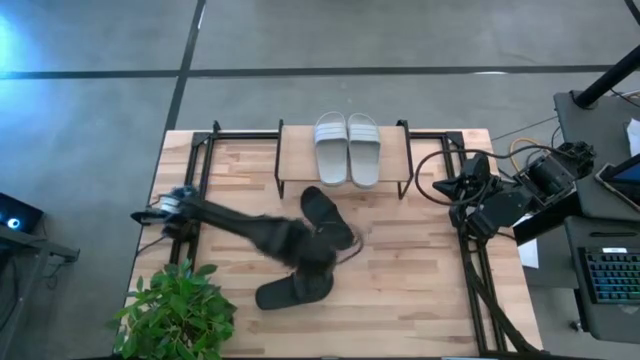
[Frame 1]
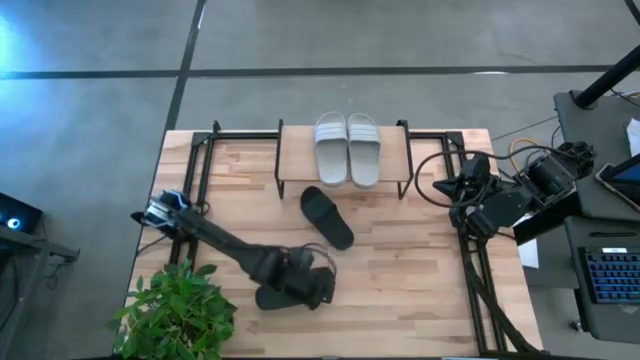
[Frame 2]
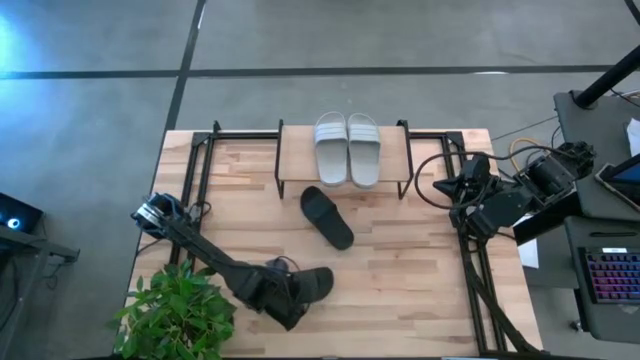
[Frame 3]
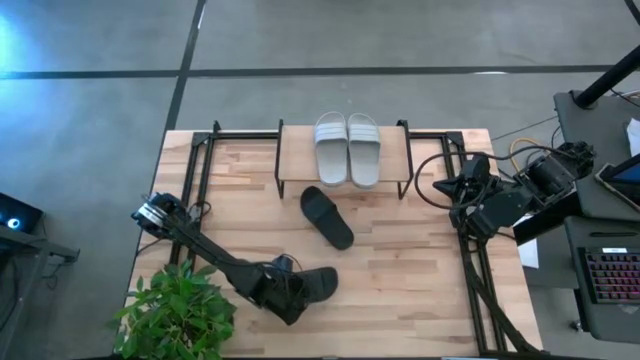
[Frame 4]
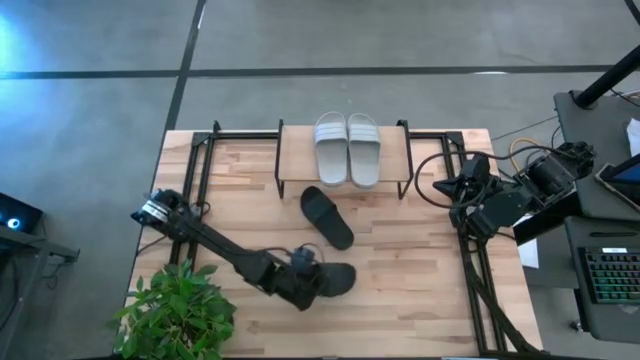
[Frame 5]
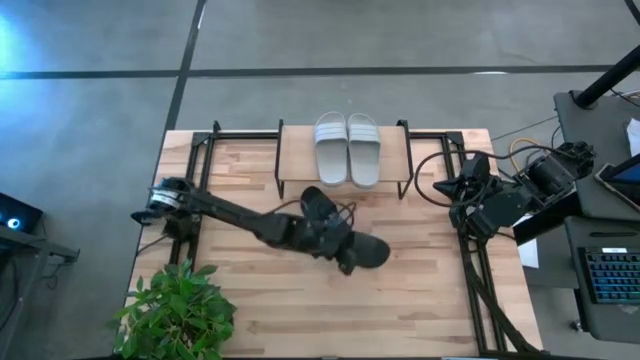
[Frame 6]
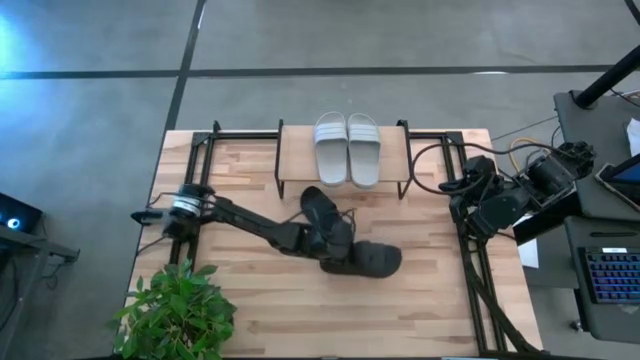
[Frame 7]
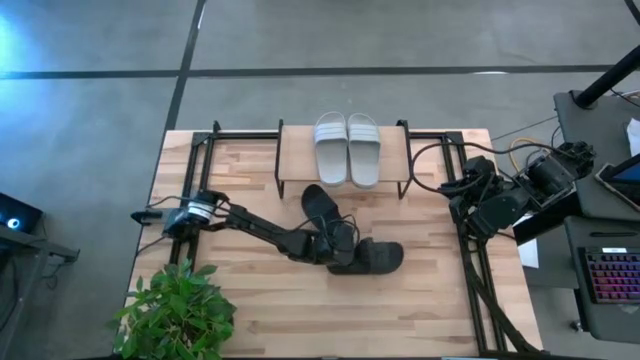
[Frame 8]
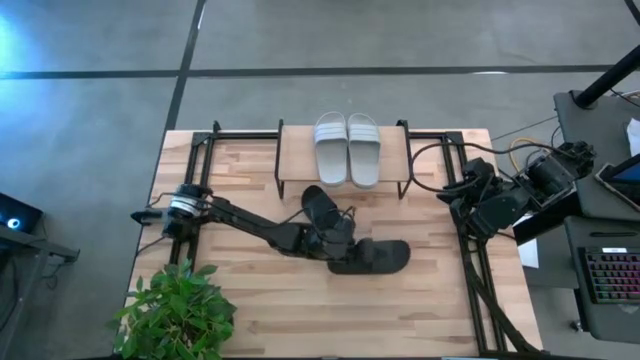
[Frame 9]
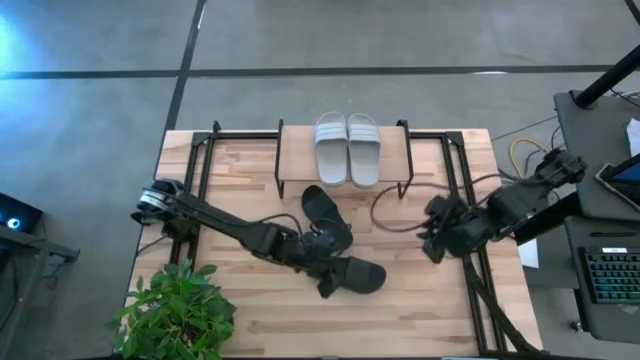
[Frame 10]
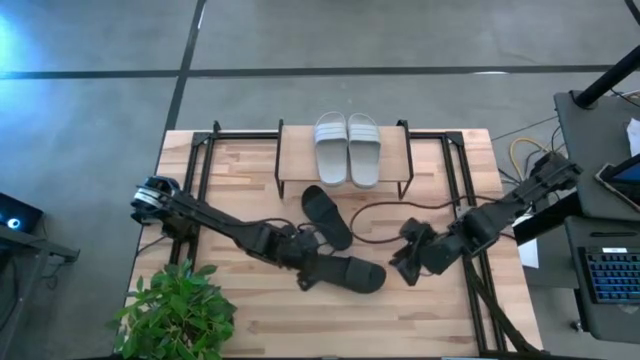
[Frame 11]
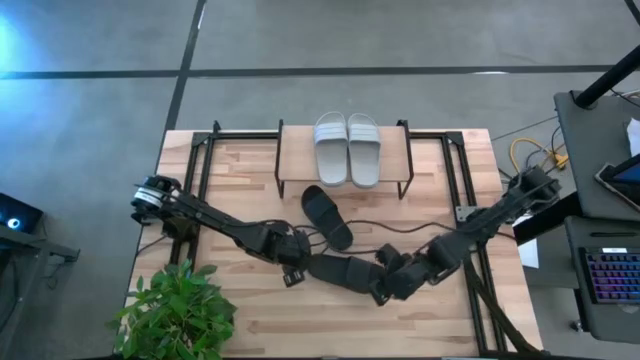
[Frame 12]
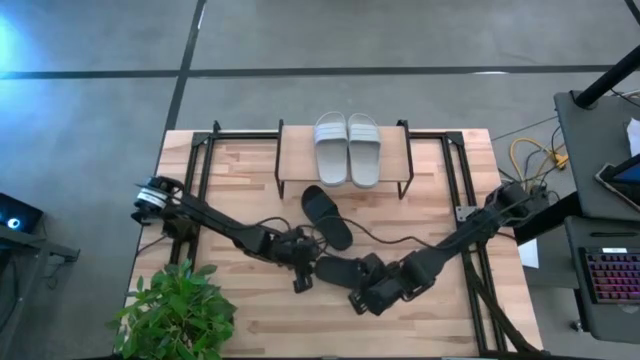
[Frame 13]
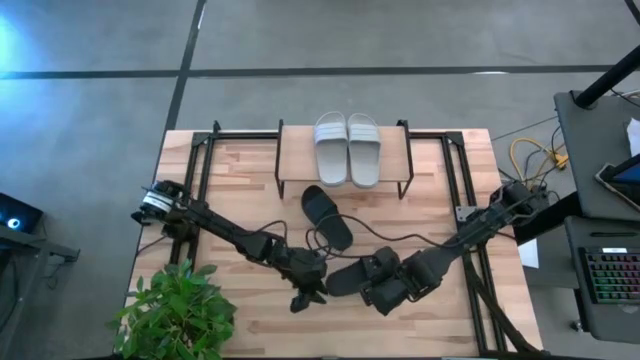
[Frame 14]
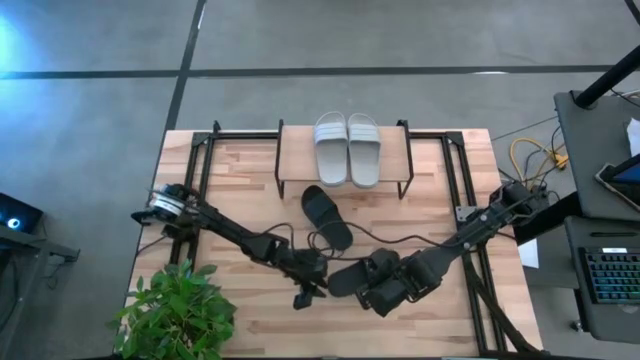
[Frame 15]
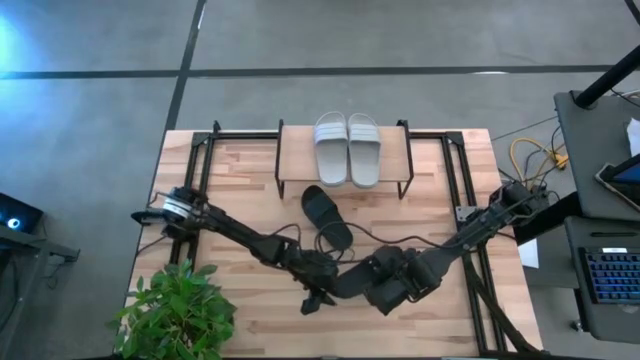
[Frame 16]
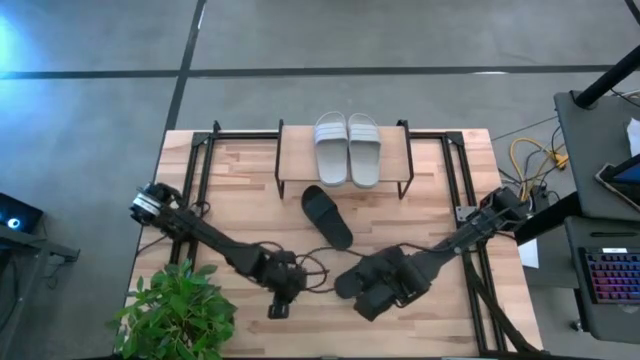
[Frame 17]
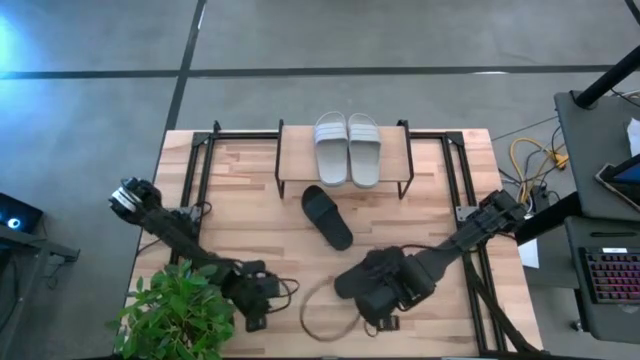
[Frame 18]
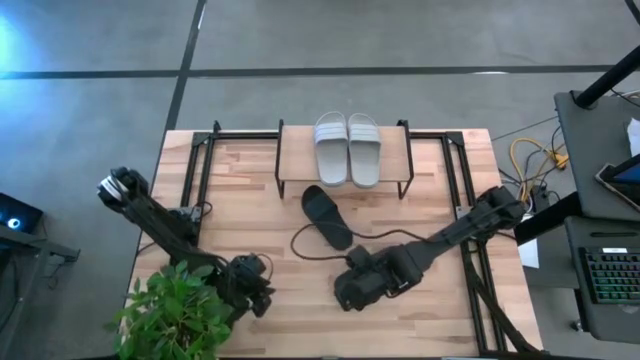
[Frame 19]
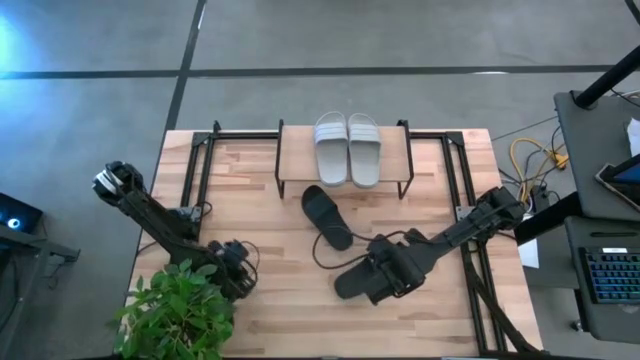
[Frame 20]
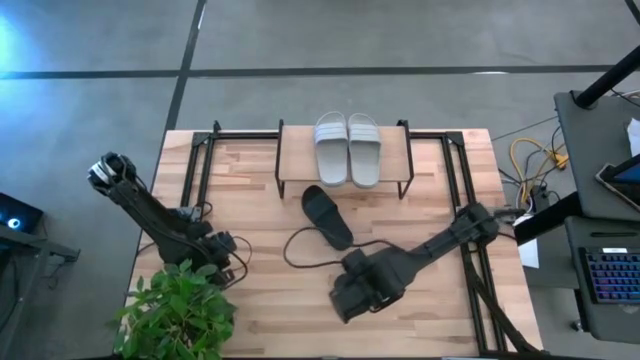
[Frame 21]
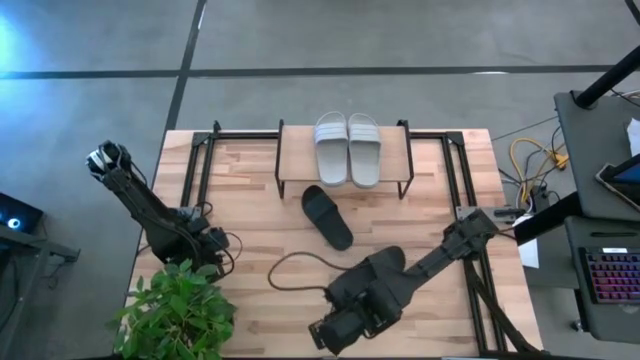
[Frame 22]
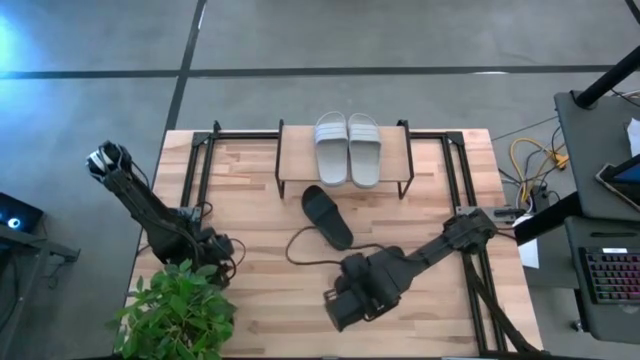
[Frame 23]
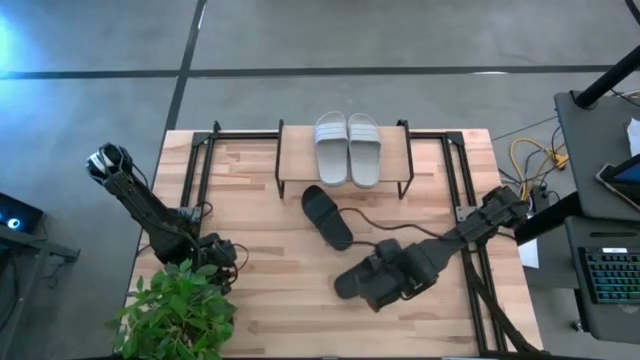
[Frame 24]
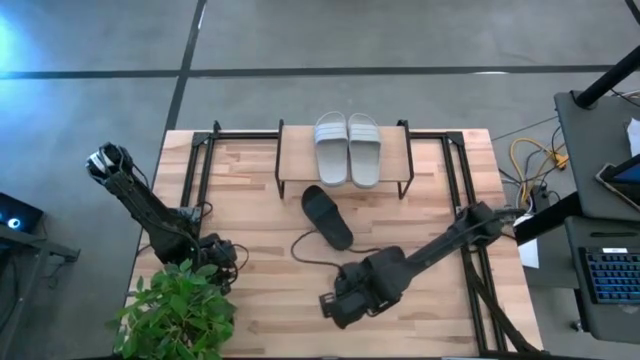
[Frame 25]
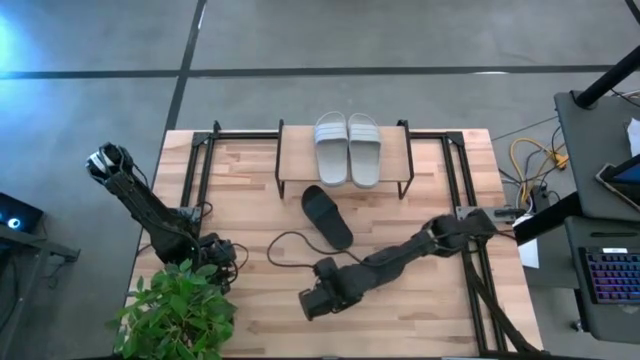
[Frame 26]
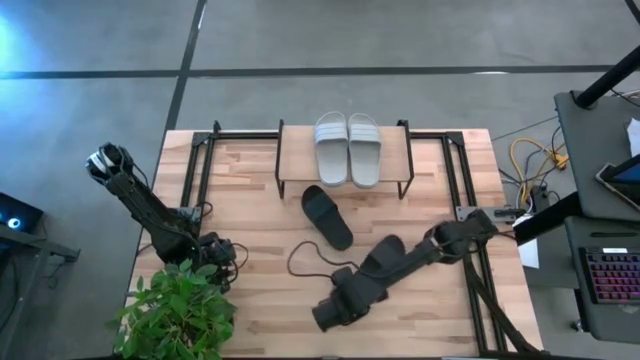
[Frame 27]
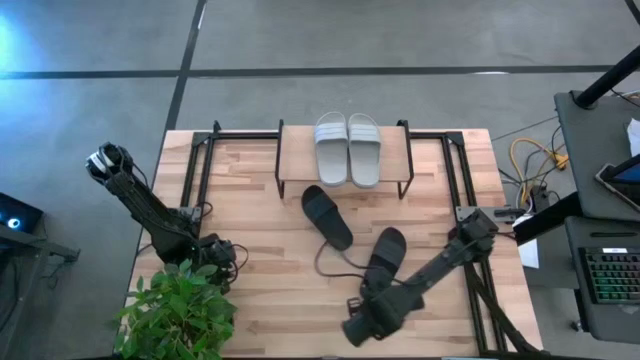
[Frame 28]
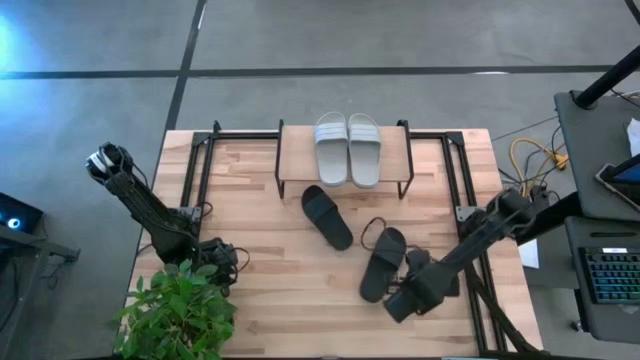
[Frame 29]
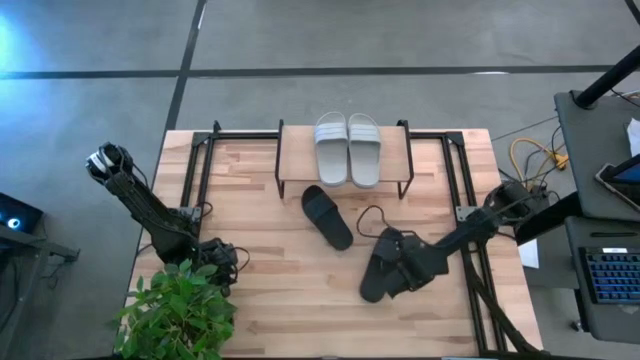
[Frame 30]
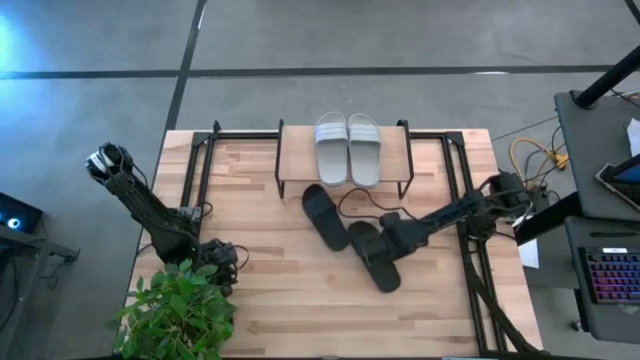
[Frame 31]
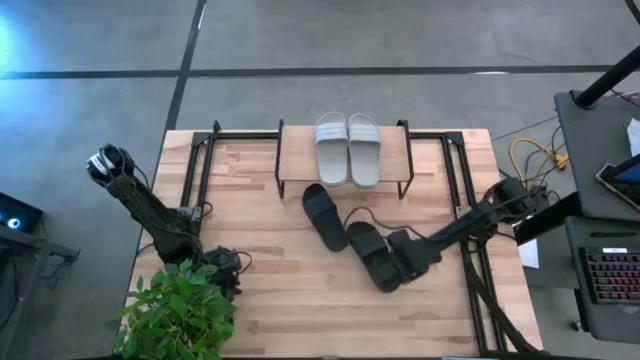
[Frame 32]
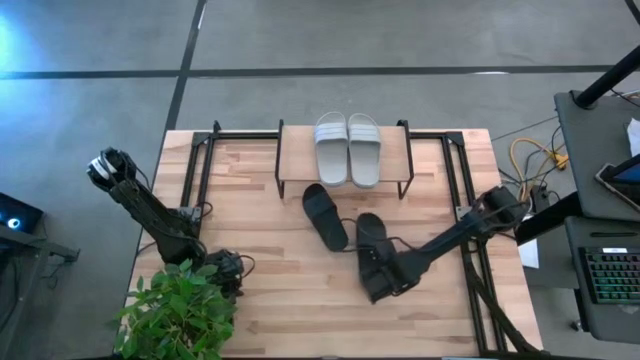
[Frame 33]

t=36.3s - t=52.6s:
Task: Pick and place slides into the shelf
Put the bottom black slide under the shelf

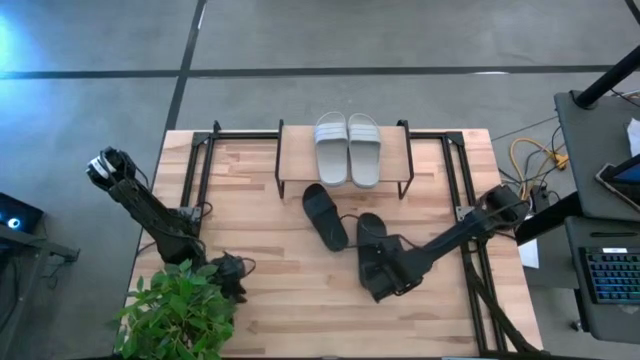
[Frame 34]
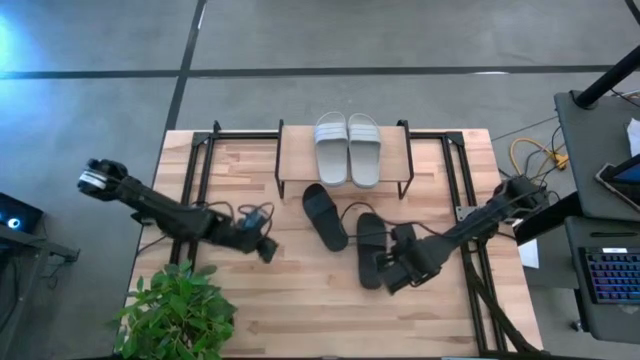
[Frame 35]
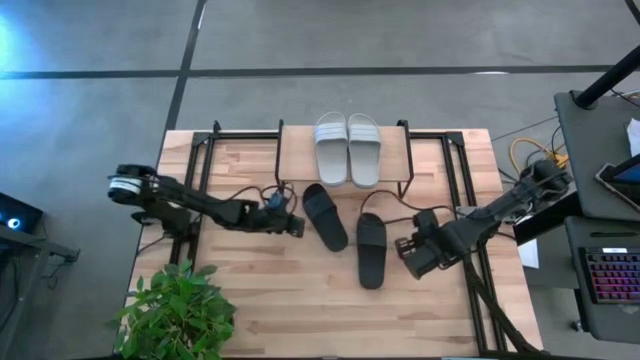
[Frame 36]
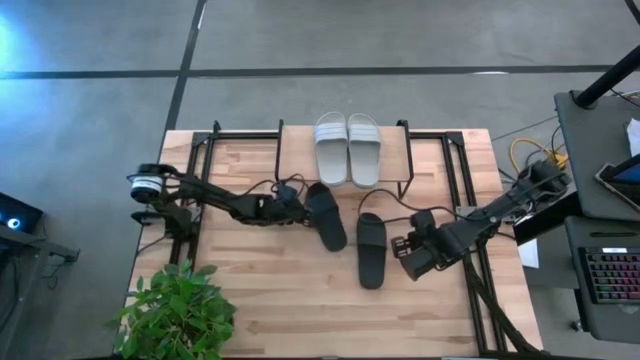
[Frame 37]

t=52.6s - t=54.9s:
Adjust the left black slide

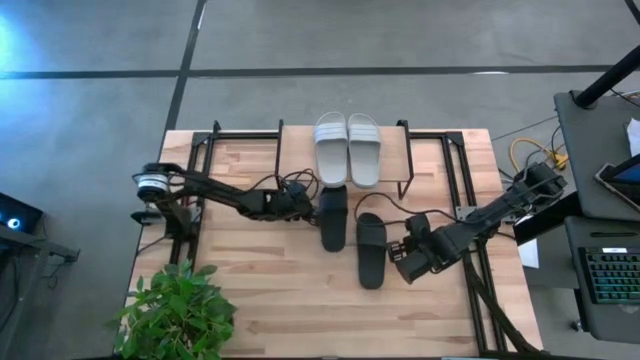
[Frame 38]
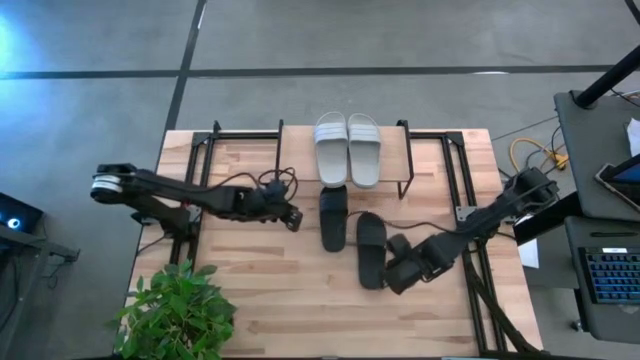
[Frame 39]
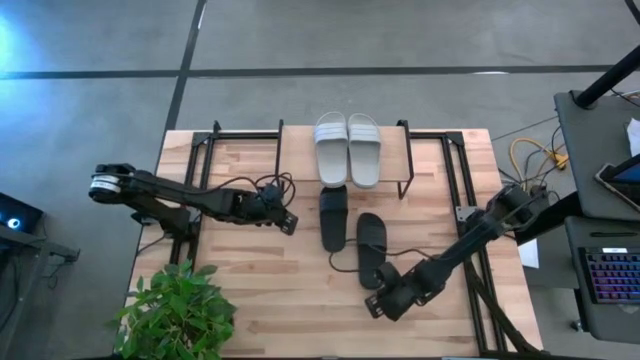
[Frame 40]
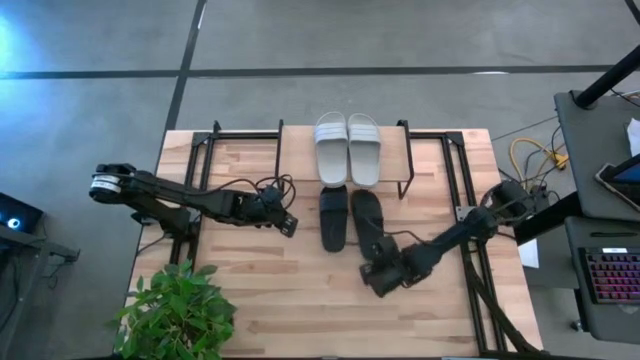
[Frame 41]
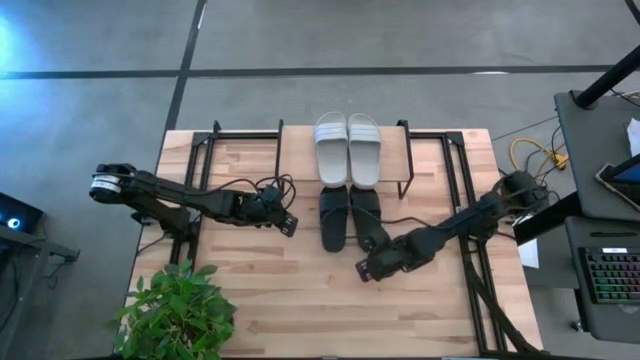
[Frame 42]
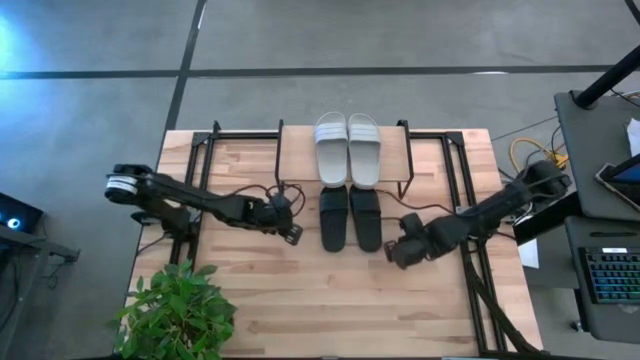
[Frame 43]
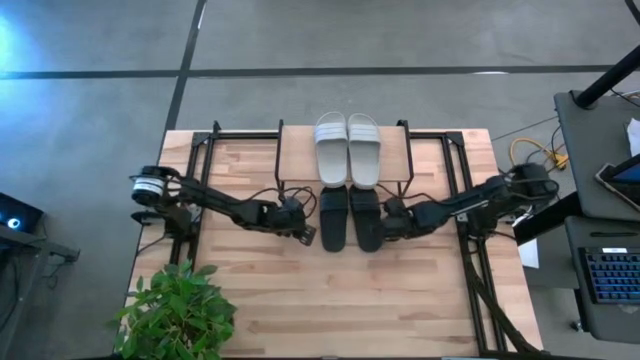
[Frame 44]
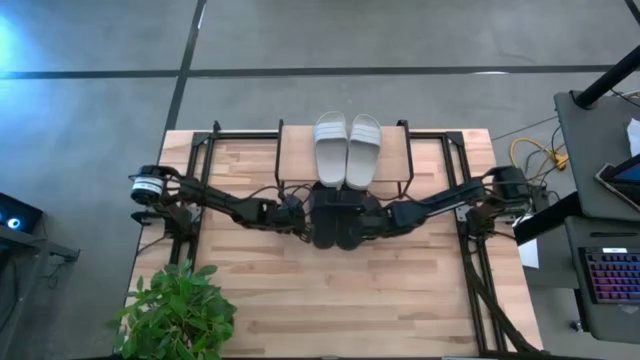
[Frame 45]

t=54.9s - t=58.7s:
Put the right black slide under the shelf
